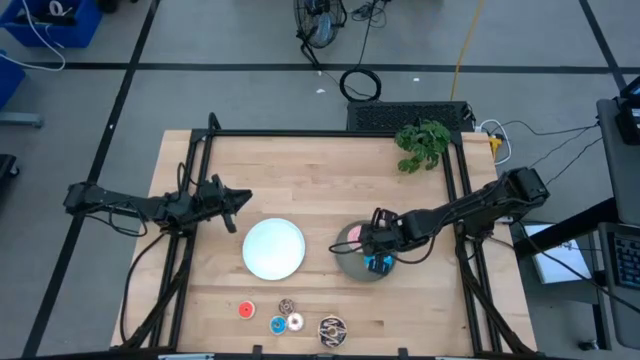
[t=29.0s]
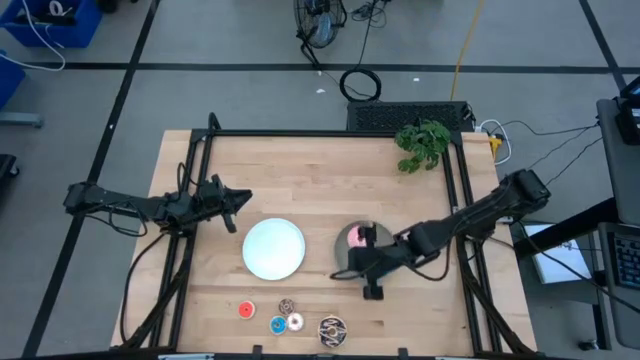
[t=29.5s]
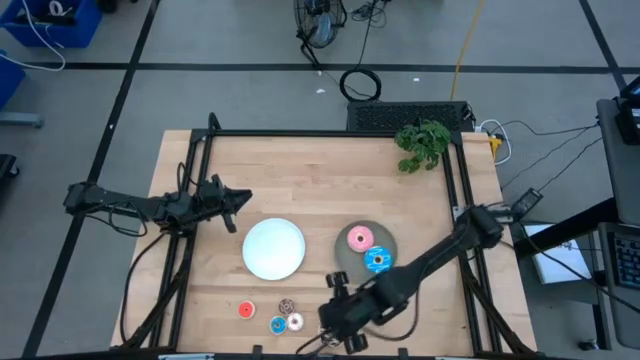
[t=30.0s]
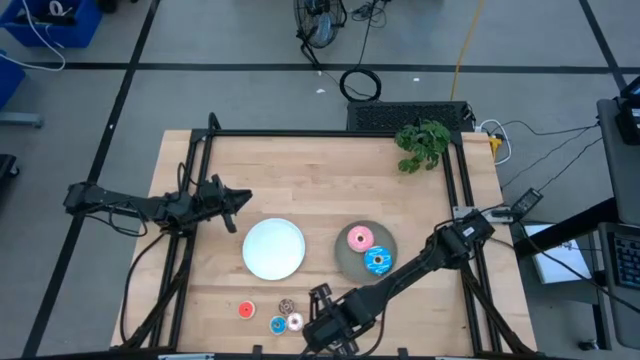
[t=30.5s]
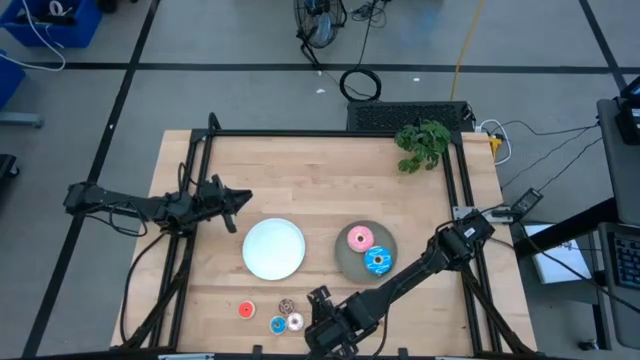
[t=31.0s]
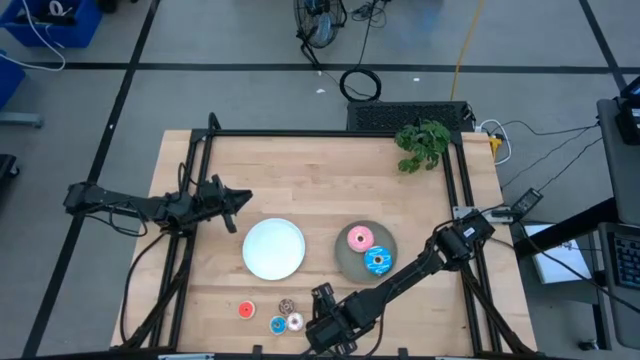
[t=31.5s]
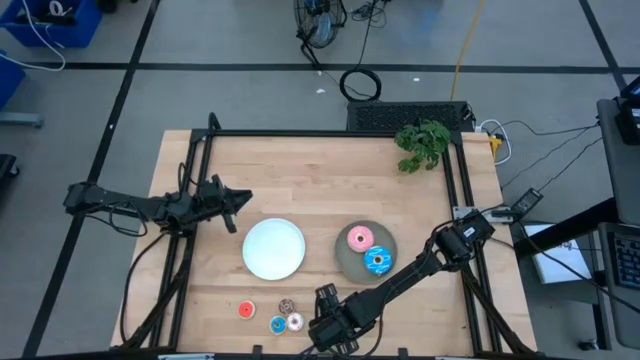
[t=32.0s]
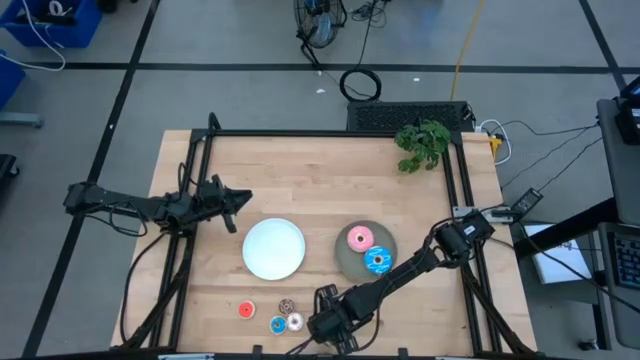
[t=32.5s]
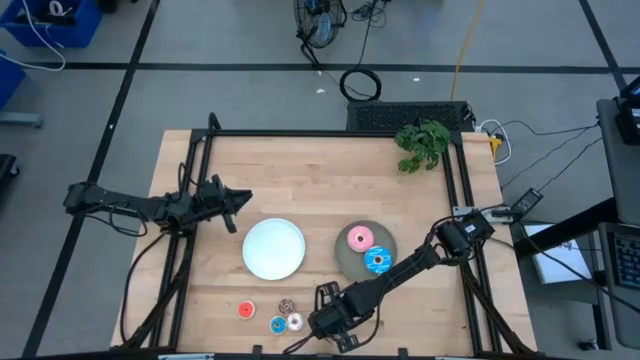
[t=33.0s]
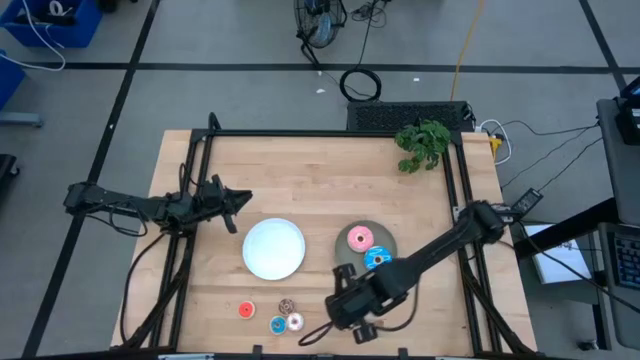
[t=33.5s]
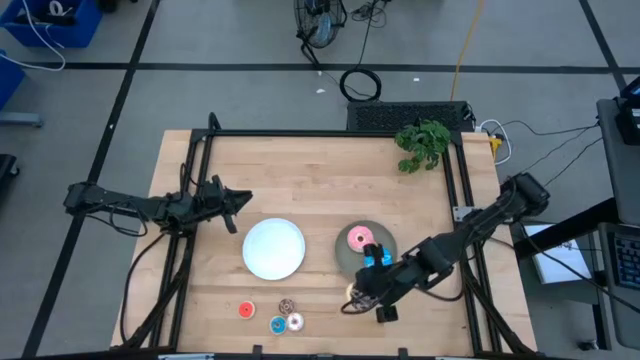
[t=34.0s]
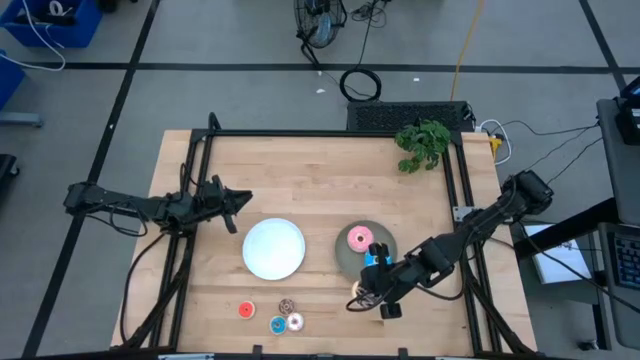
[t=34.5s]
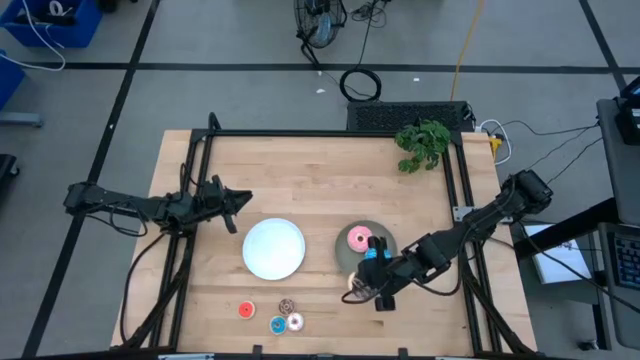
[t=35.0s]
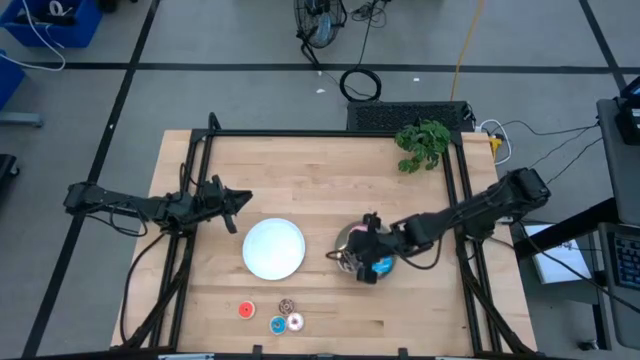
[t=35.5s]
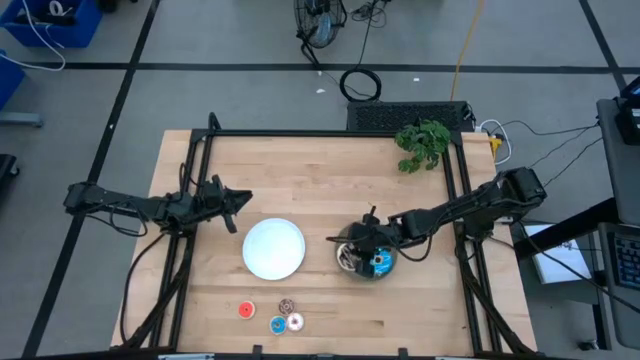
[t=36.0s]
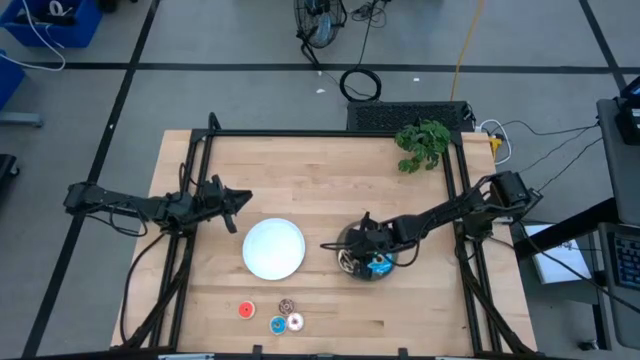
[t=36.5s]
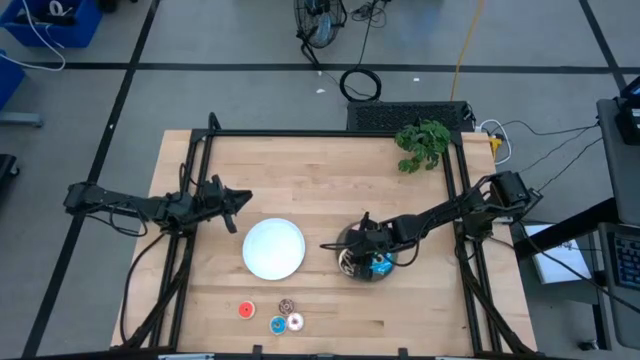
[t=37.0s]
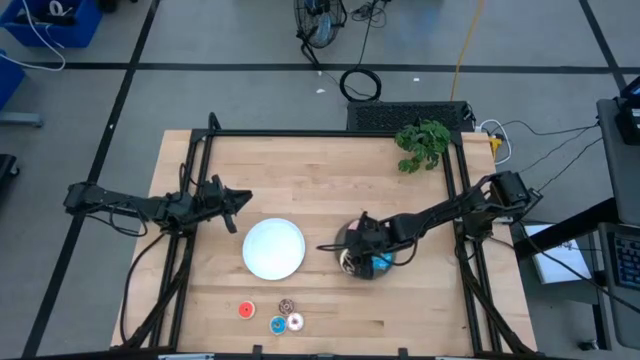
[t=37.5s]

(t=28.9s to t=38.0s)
Task: Pick & Place donuts
Put the big black donut on the gray plate

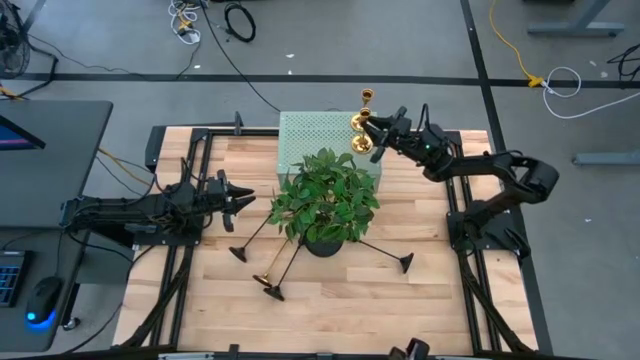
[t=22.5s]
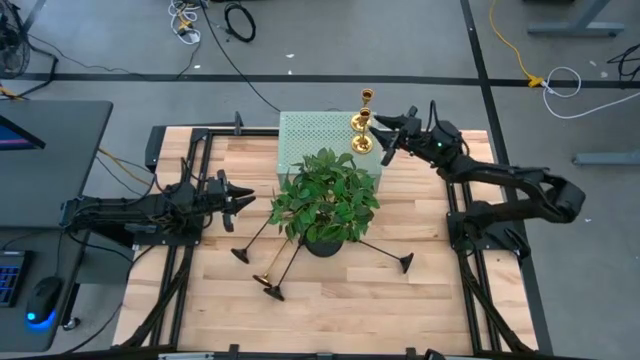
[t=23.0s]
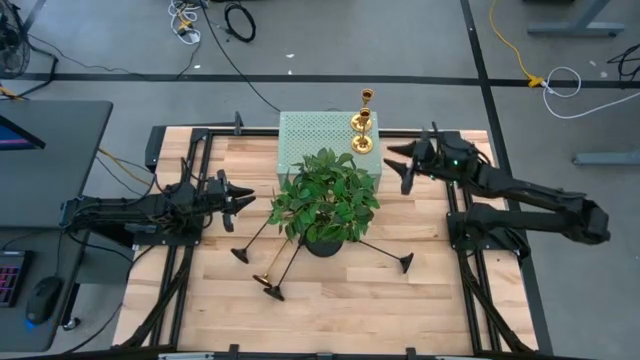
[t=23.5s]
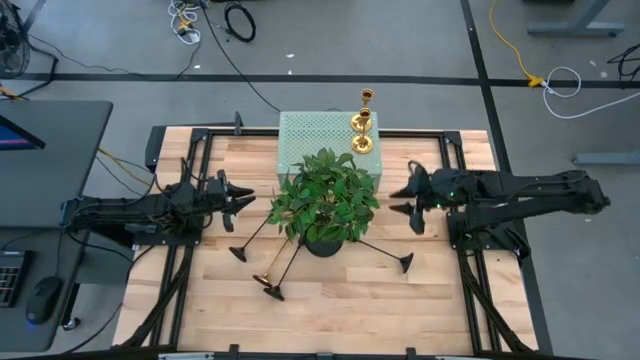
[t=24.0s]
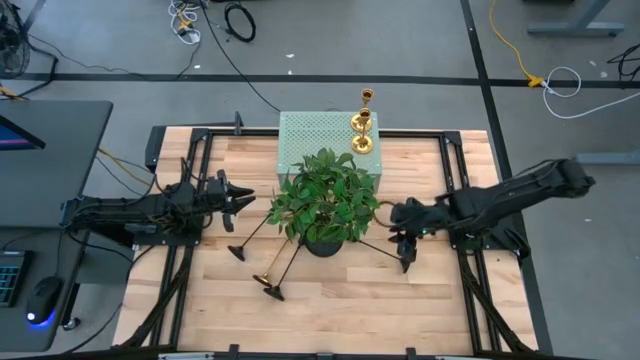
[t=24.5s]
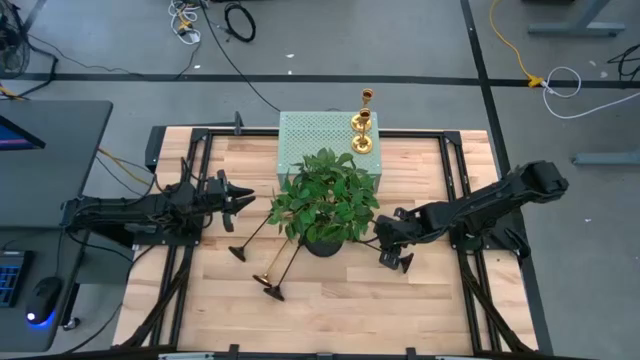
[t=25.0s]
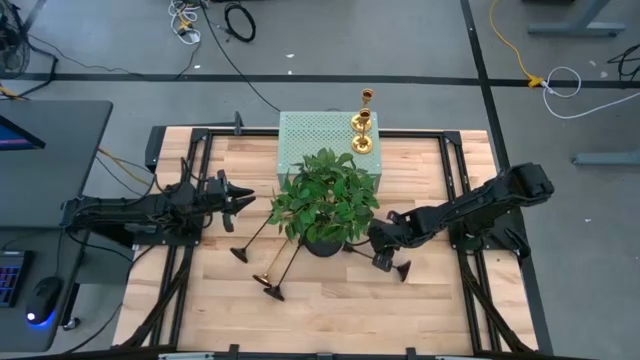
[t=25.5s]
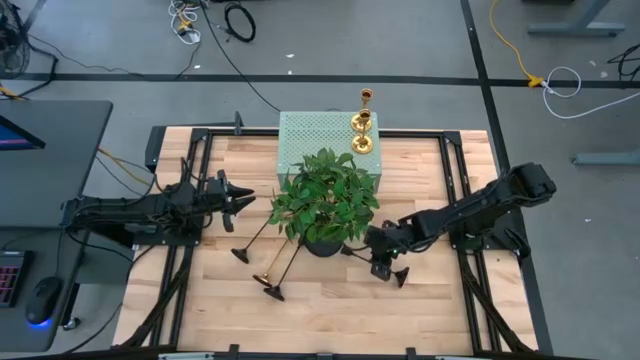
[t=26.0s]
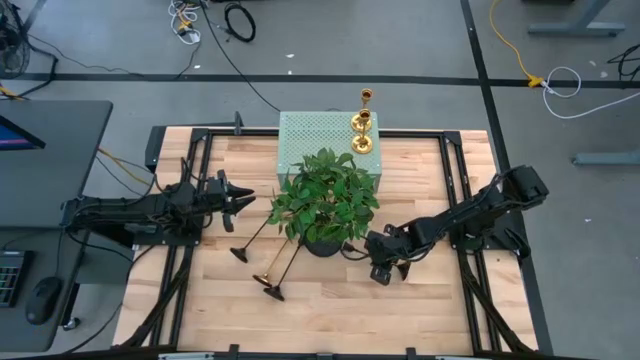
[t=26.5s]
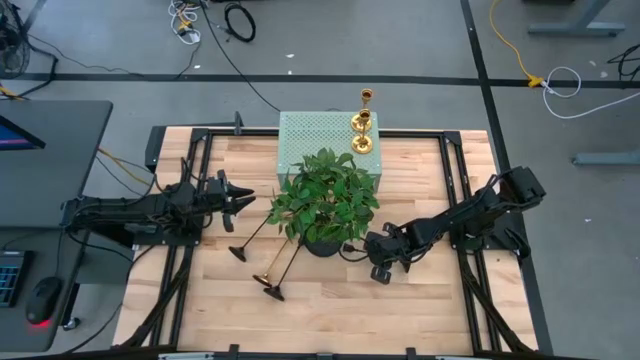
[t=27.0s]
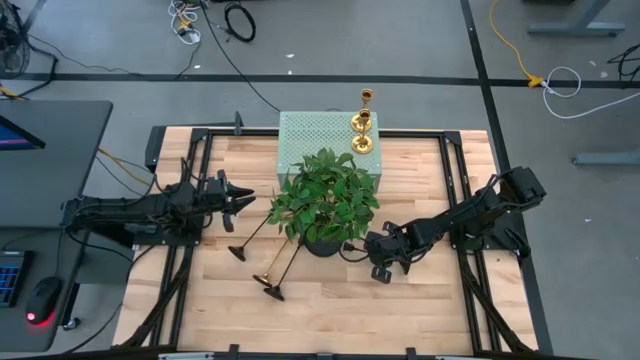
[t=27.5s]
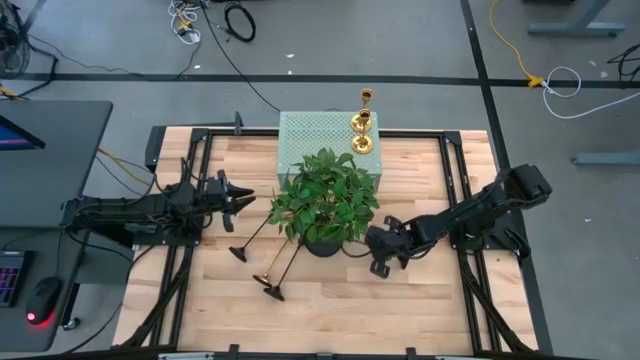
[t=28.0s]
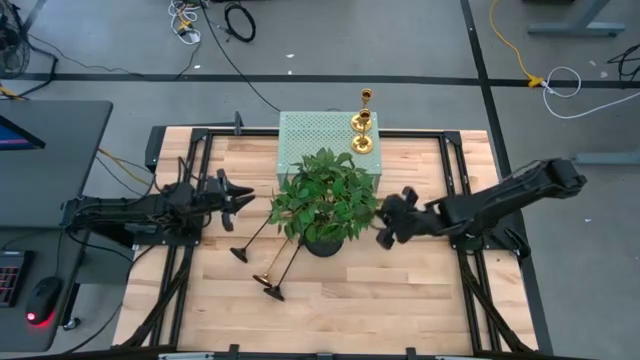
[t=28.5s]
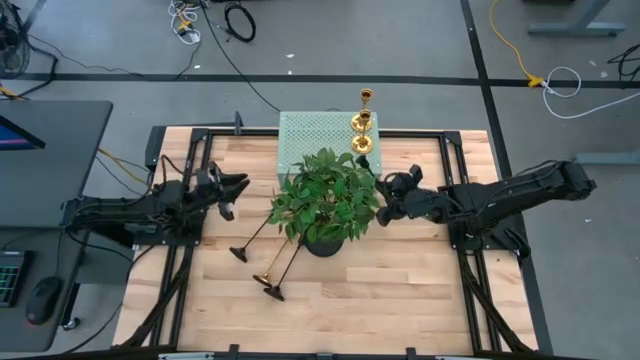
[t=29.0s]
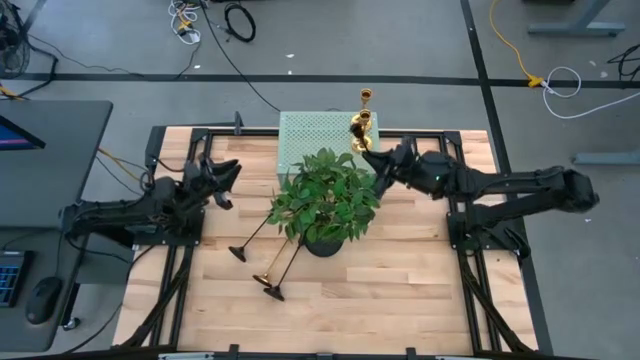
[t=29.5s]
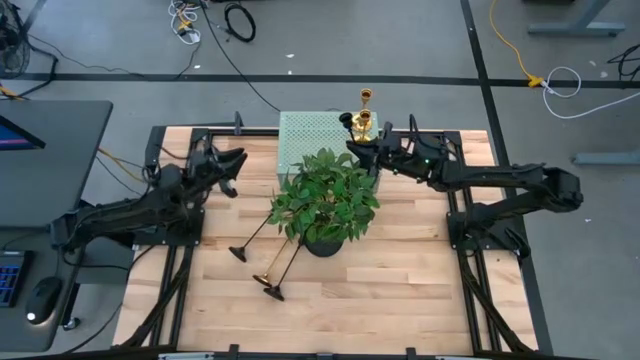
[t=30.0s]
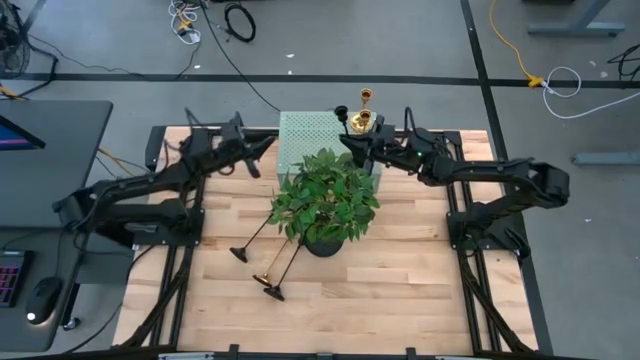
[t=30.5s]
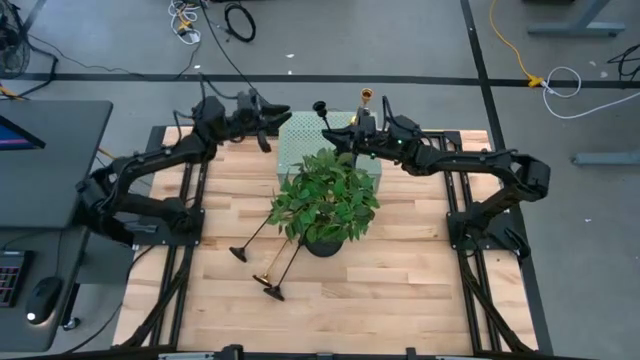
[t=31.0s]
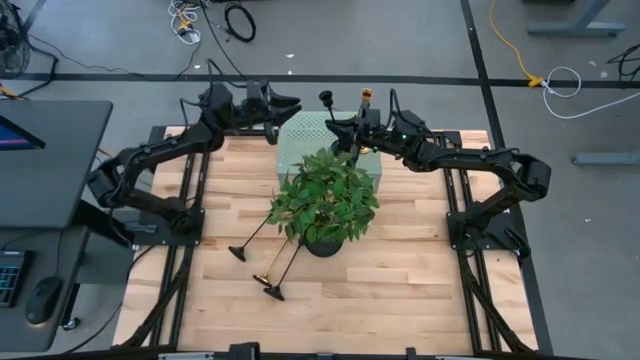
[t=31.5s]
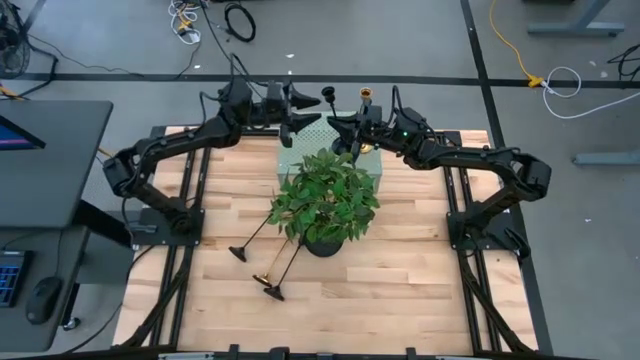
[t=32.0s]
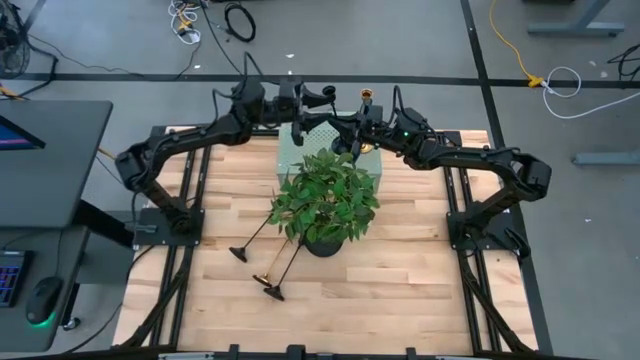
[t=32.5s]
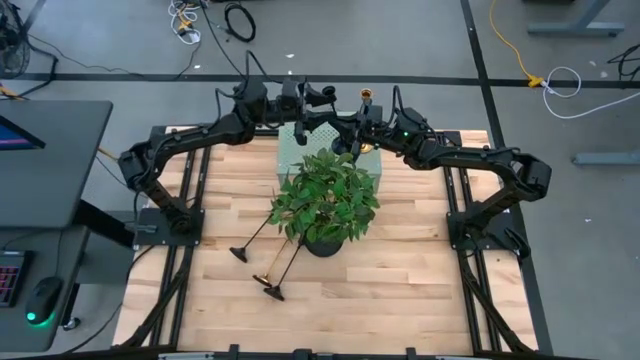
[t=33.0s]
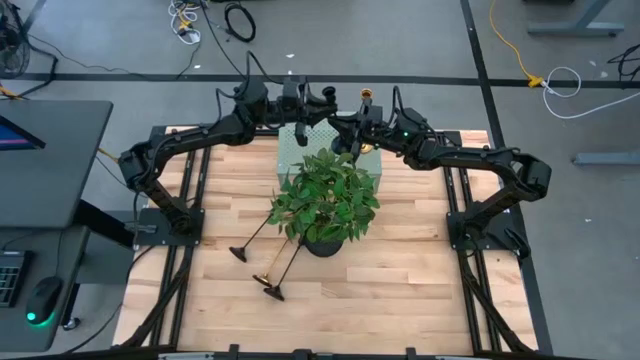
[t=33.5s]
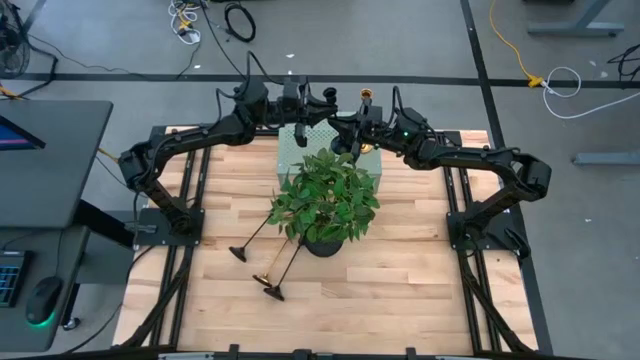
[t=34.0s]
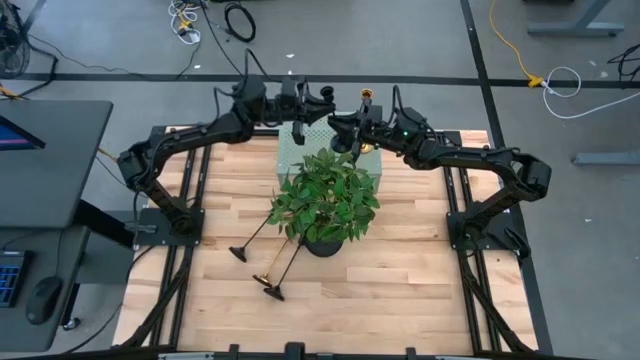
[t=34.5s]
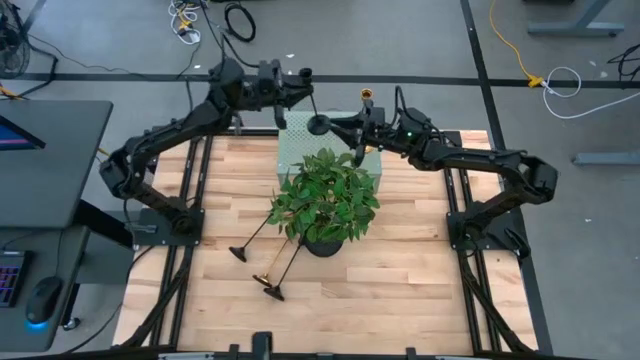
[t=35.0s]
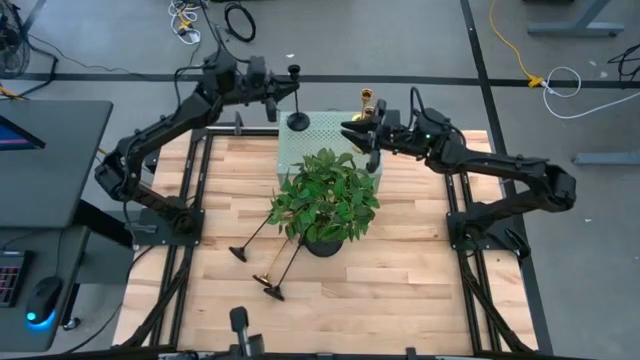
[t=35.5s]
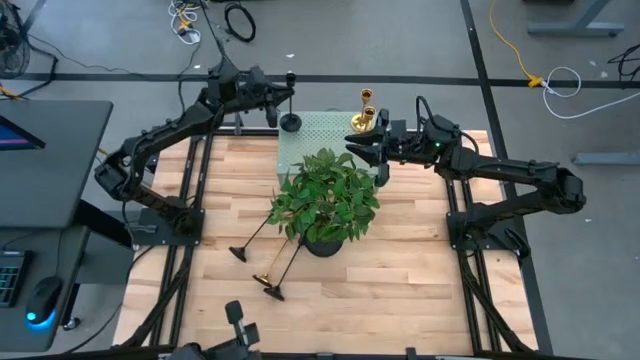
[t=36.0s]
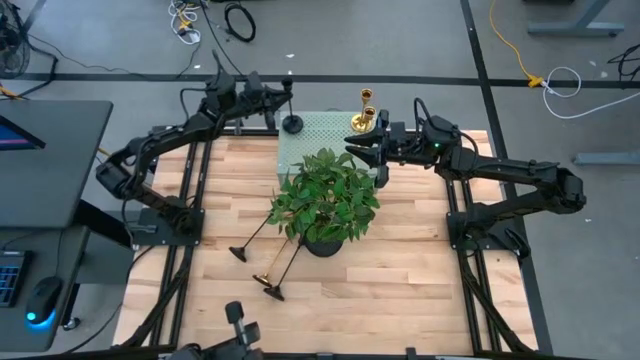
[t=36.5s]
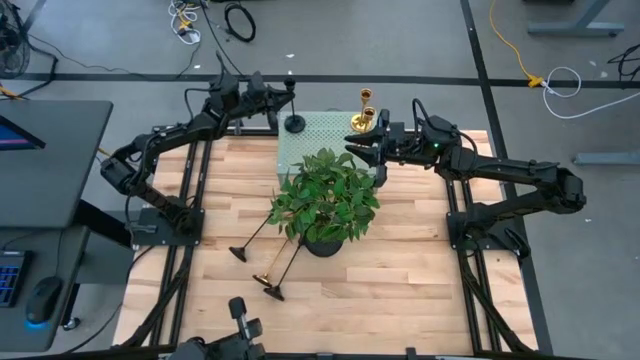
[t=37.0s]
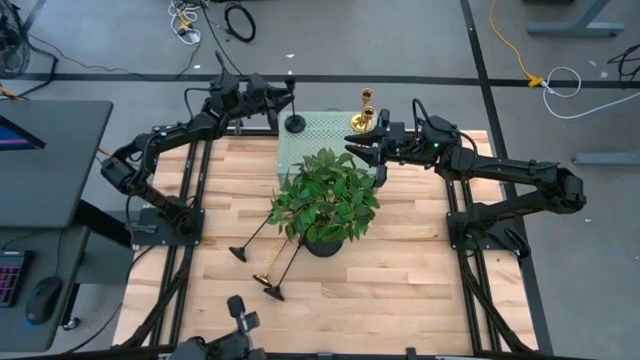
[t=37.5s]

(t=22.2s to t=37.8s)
Task: Pick & Place candle stick holders
Put the right black candle holder on the shelf
